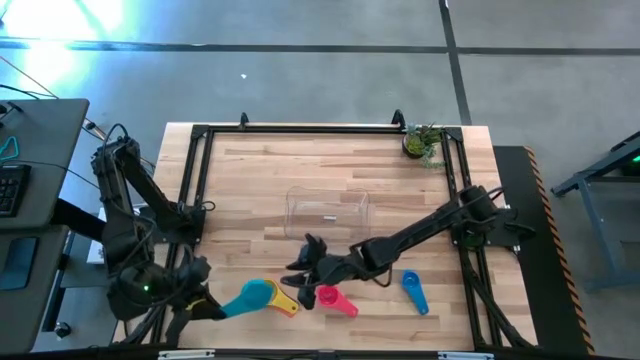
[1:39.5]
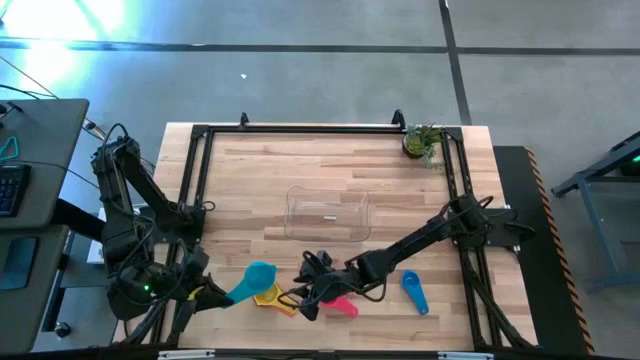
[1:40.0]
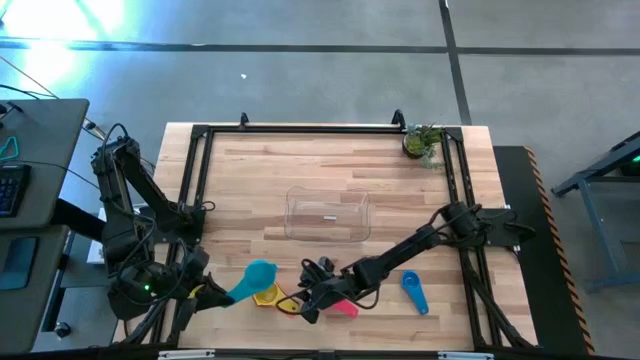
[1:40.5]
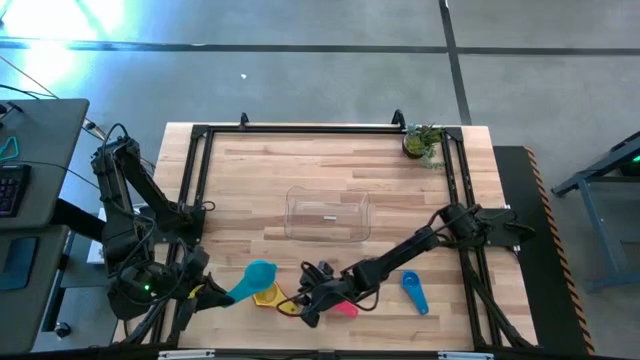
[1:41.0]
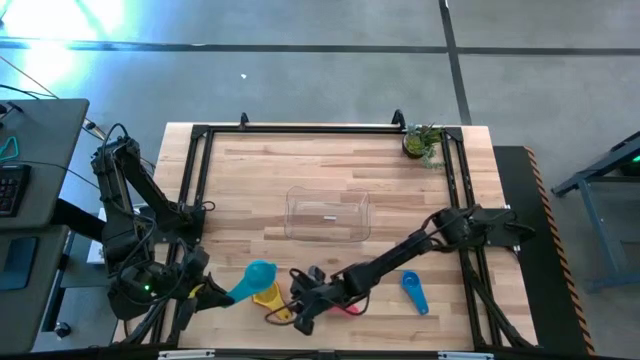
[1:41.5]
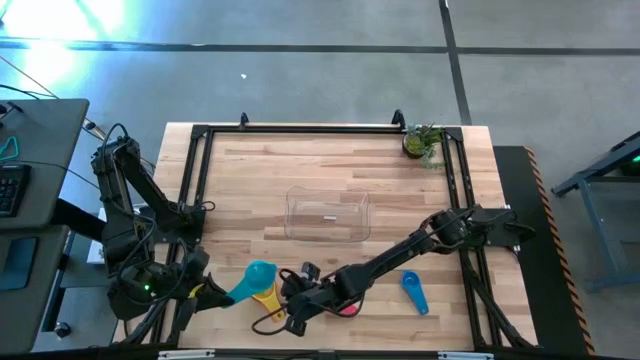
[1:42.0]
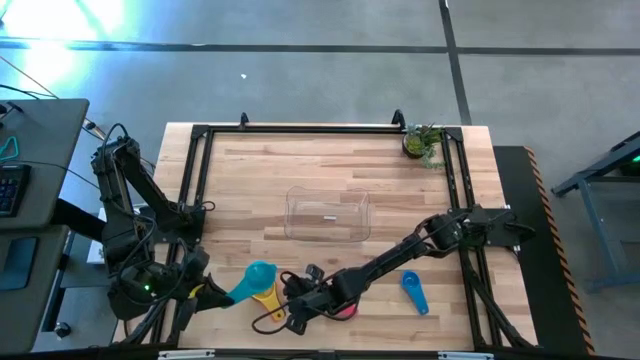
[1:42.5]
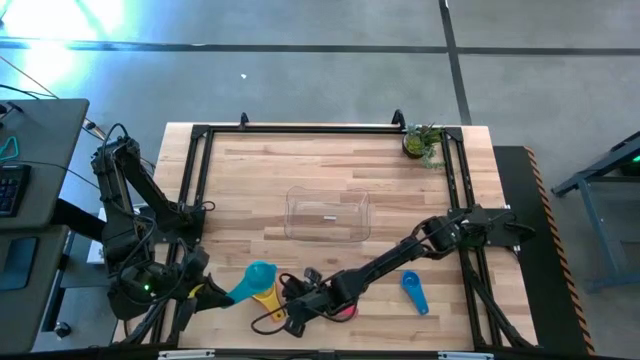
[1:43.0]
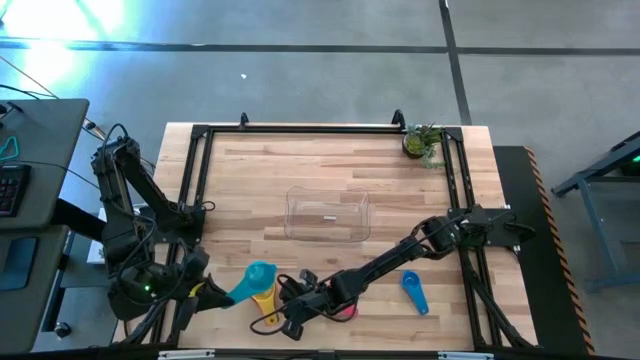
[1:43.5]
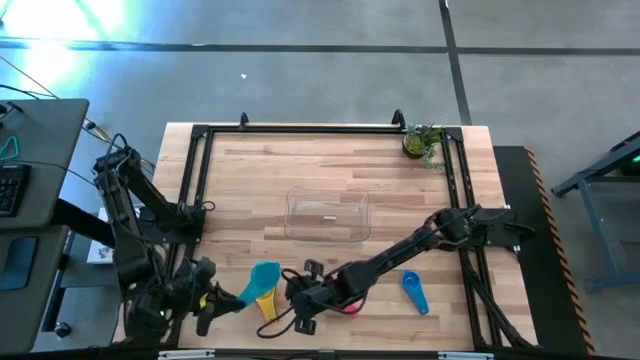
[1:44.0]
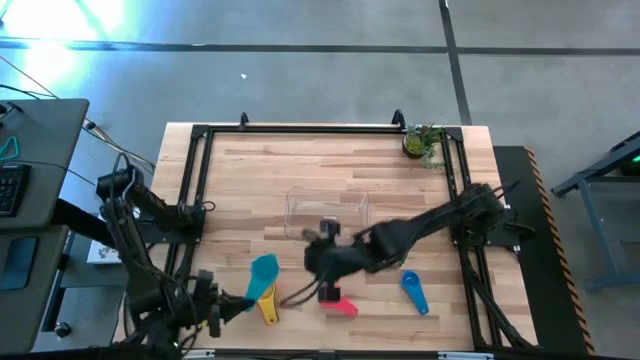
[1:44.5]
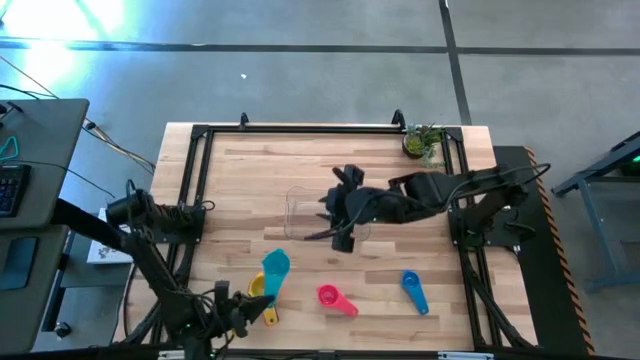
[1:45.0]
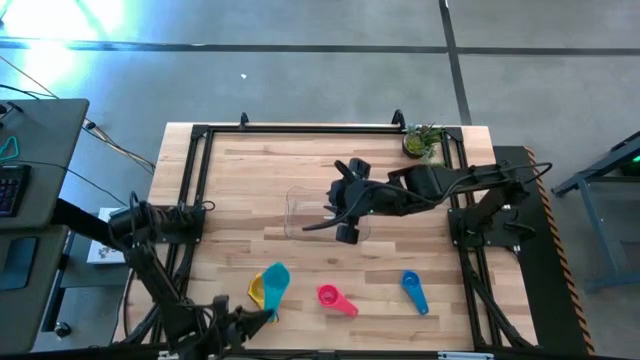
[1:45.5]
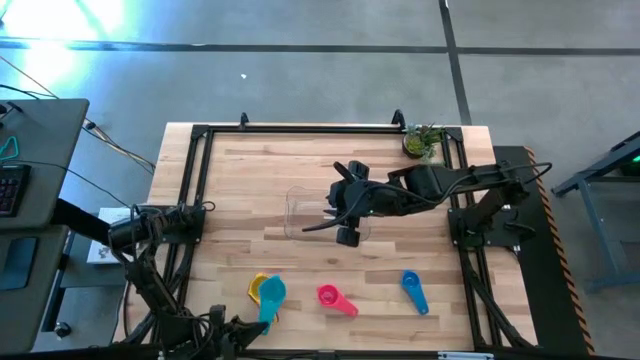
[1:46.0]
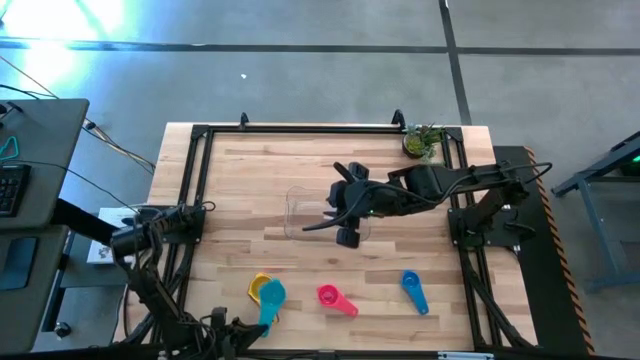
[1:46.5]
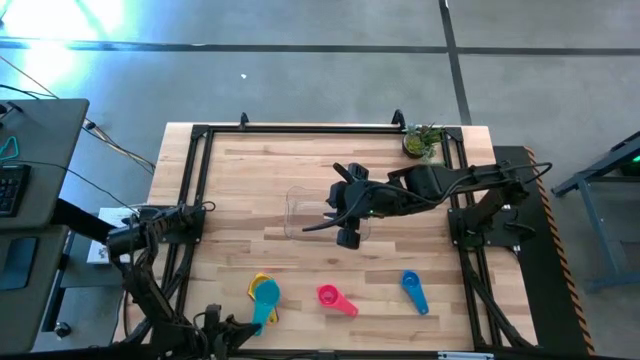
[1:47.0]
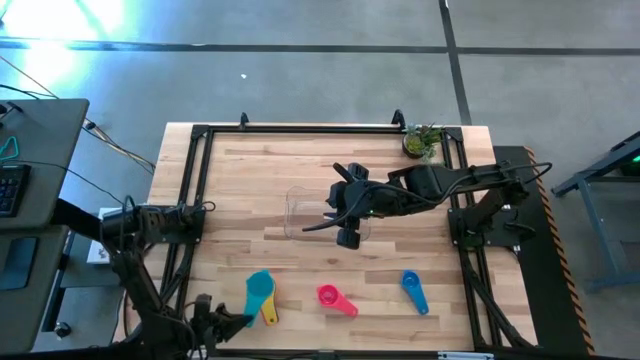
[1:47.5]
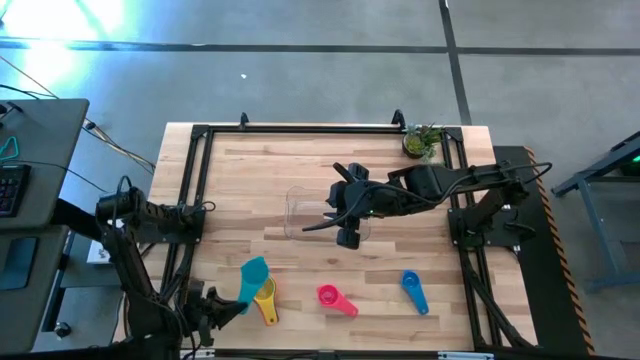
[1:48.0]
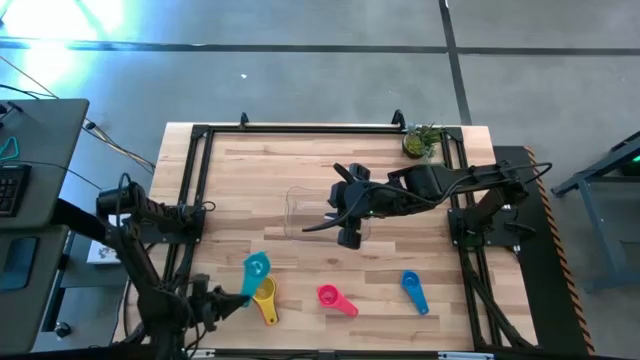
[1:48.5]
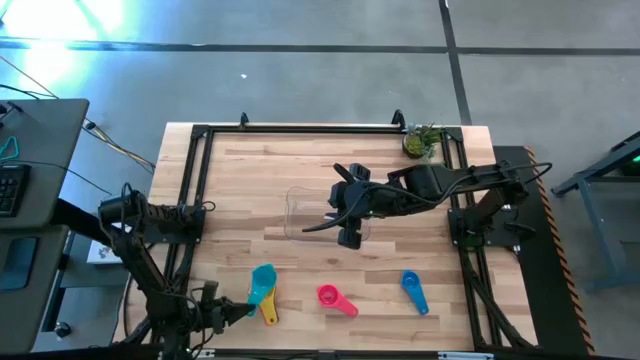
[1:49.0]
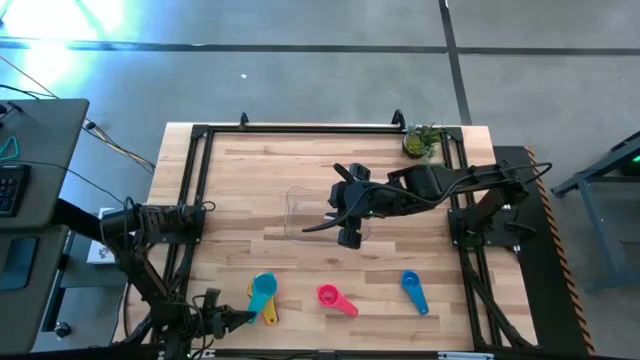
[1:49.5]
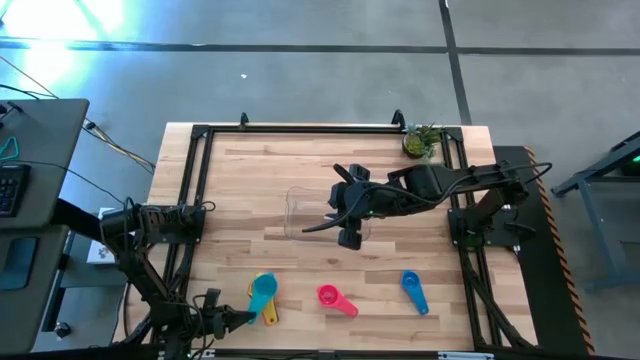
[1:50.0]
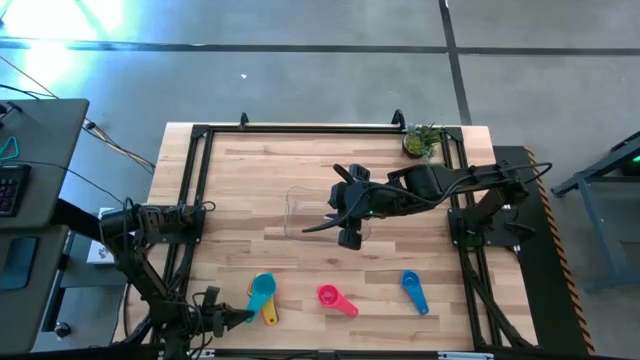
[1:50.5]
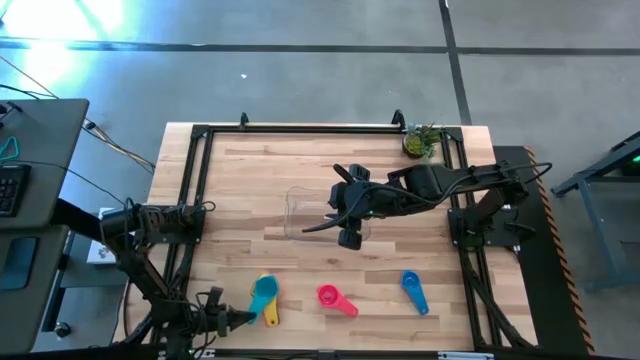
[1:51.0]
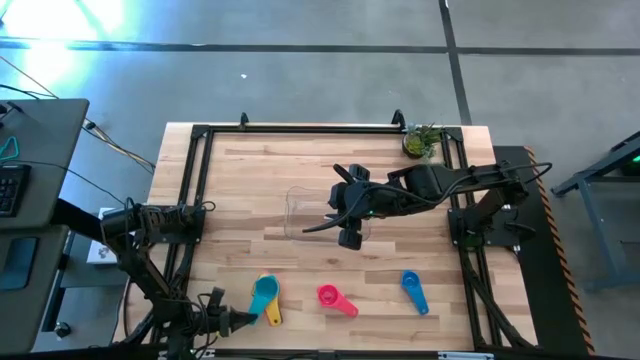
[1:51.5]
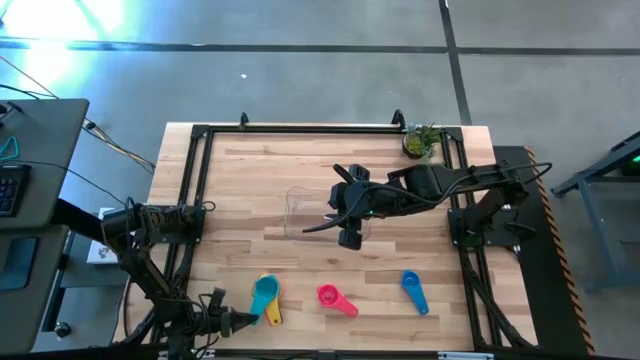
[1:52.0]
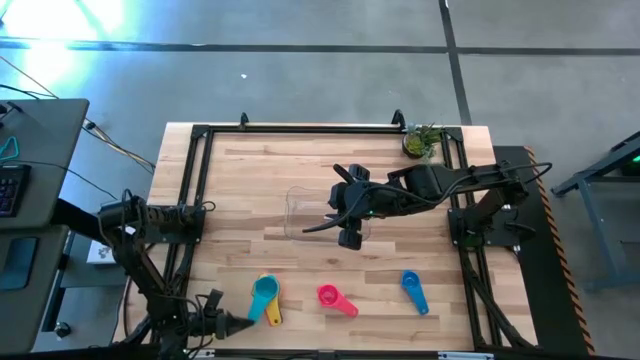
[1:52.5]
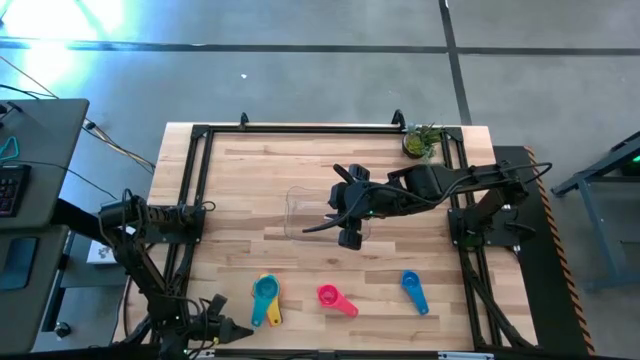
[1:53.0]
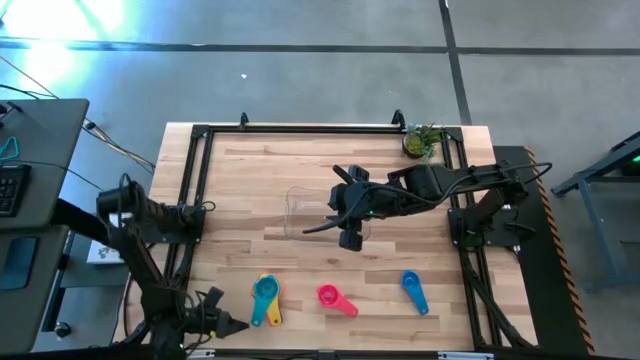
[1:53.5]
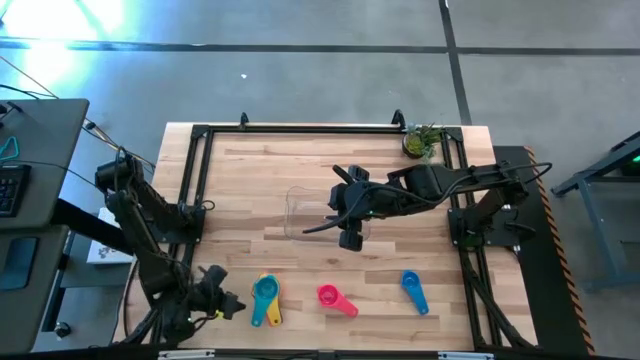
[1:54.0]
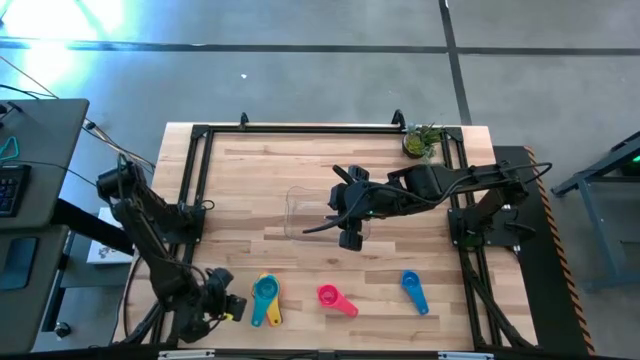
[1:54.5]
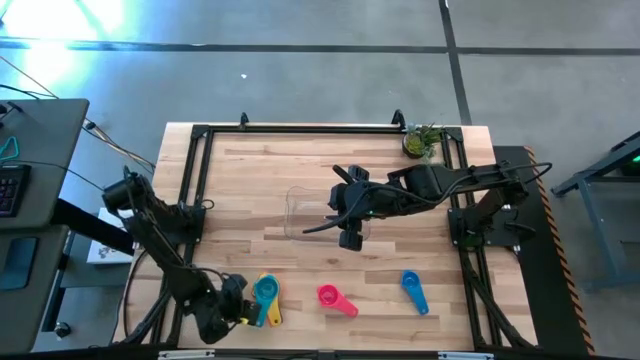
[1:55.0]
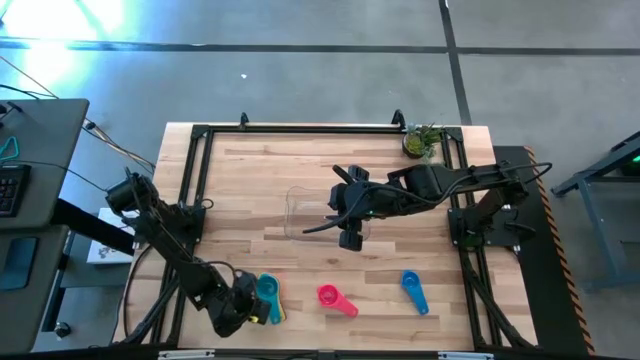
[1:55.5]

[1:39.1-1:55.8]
Task: Nest measuring cups in basket
Stack the light blue measuring cup on top of the yellow measuring cup

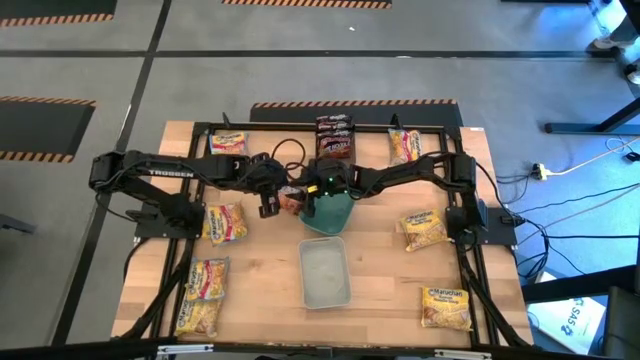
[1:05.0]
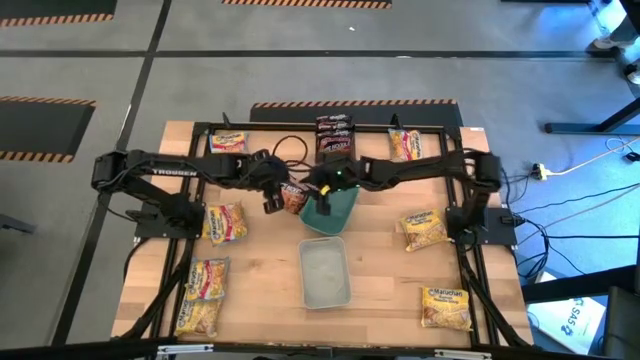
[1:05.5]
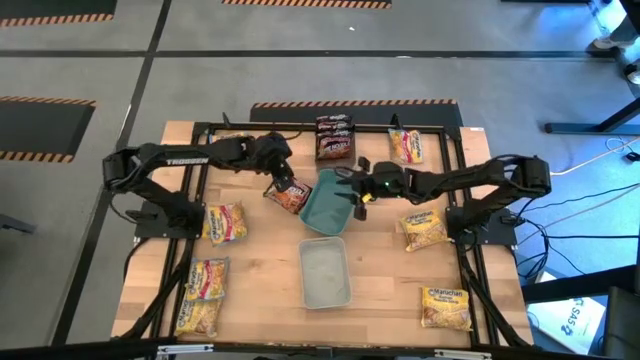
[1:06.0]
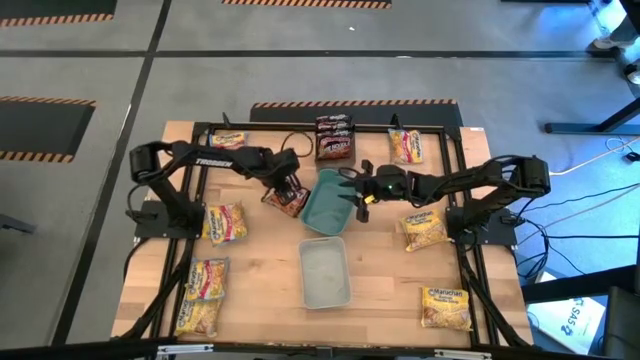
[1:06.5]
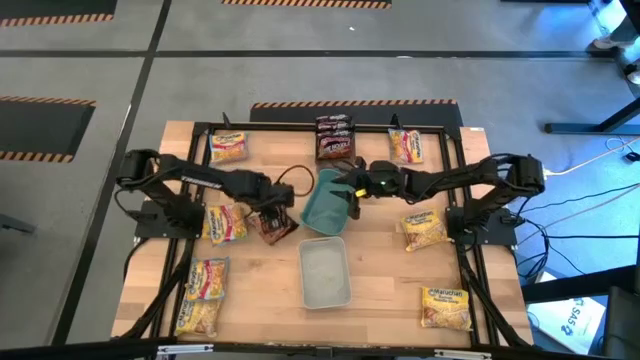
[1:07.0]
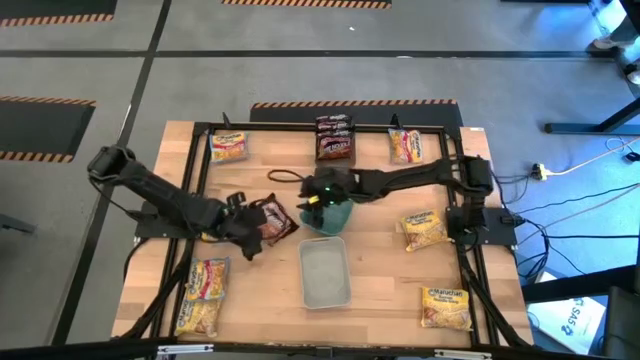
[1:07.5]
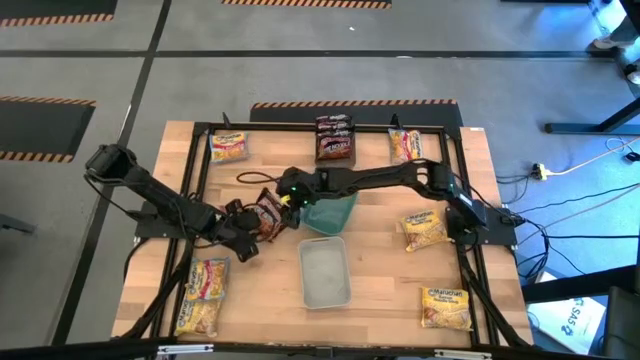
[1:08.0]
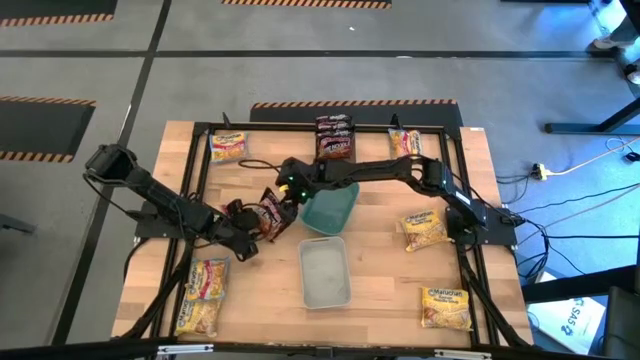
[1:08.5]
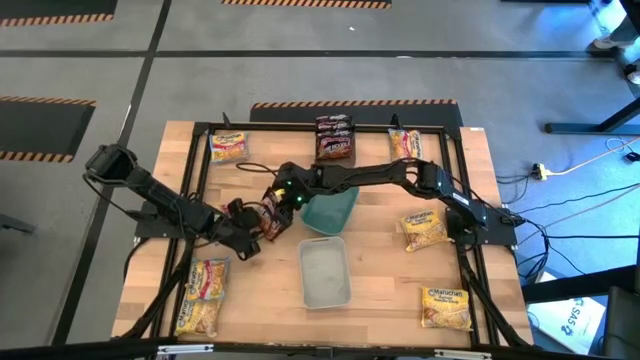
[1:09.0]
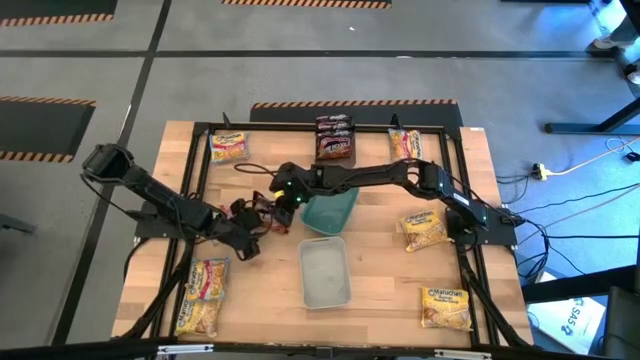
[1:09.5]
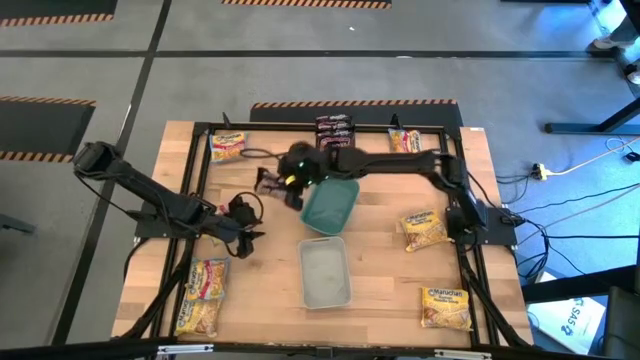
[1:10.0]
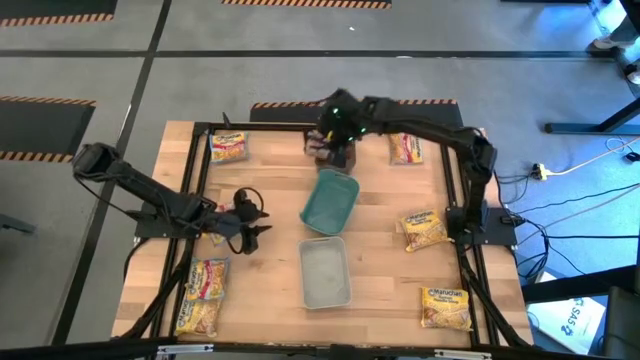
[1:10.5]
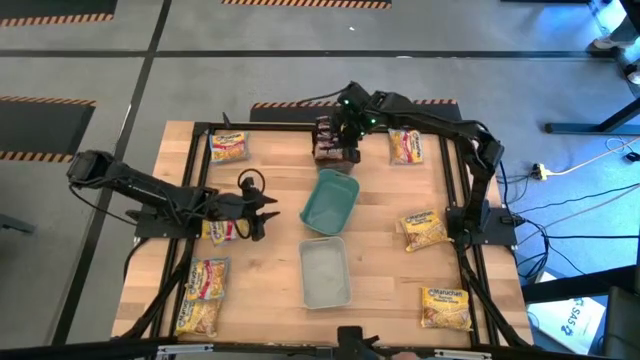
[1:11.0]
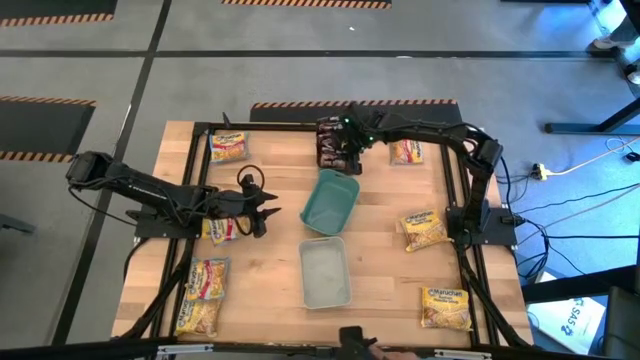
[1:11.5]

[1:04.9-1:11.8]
Task: Sort Maruchan noodles
Put the black noodle pack into the black bin
